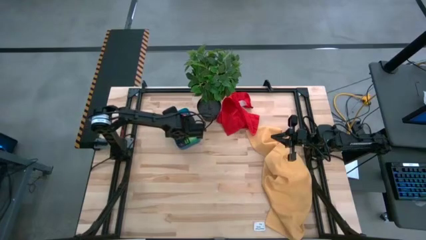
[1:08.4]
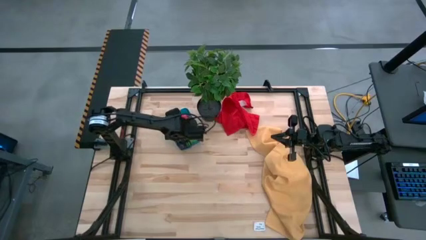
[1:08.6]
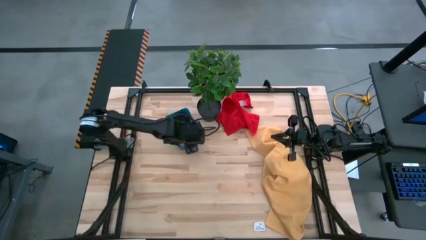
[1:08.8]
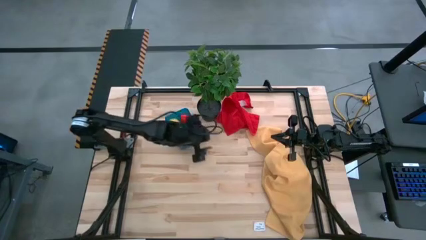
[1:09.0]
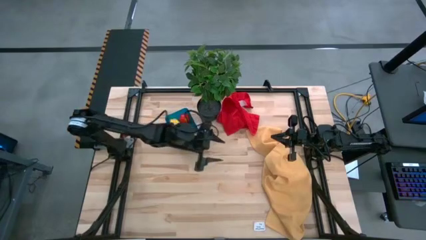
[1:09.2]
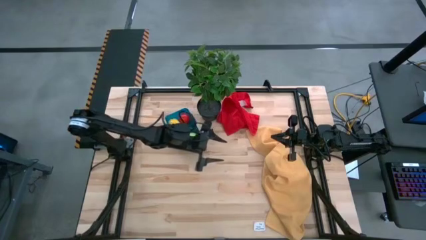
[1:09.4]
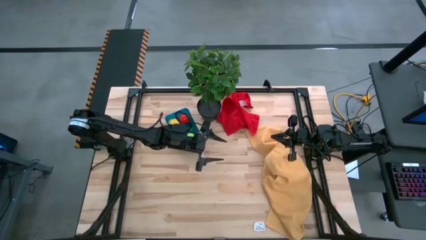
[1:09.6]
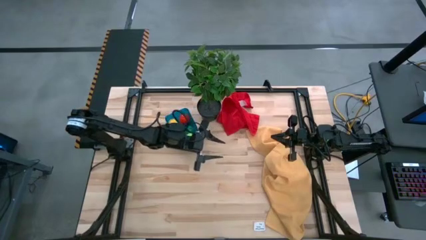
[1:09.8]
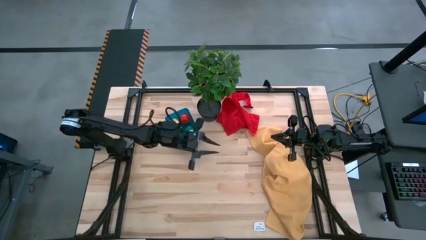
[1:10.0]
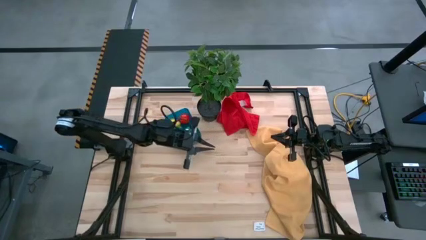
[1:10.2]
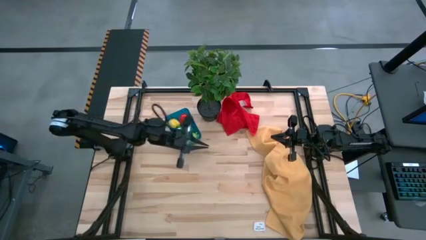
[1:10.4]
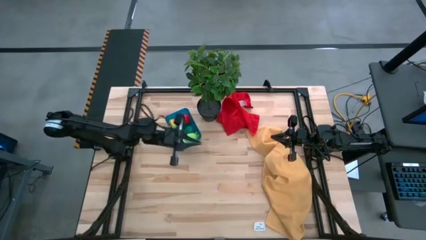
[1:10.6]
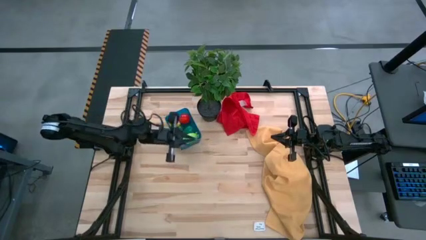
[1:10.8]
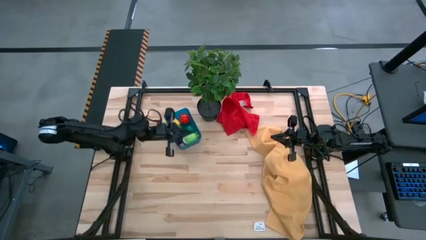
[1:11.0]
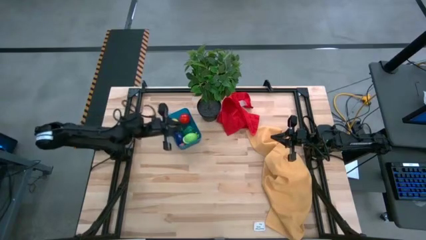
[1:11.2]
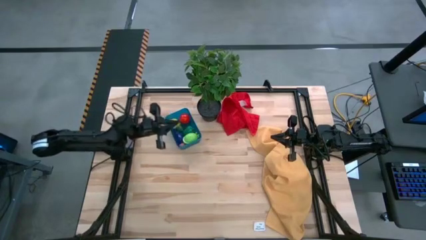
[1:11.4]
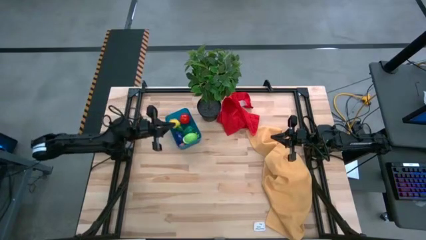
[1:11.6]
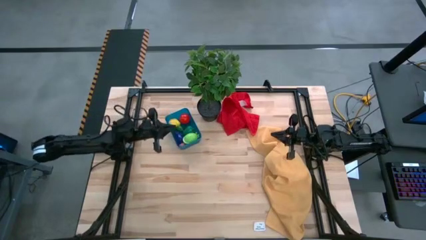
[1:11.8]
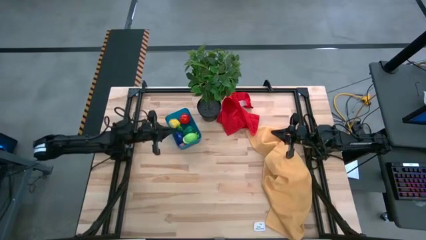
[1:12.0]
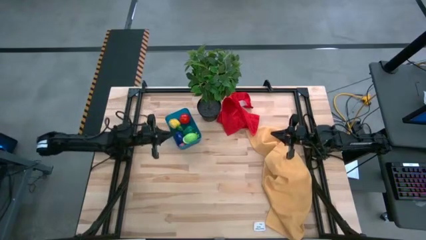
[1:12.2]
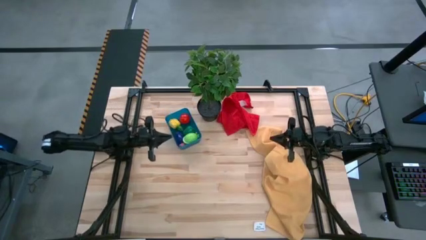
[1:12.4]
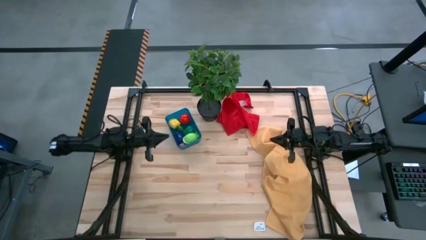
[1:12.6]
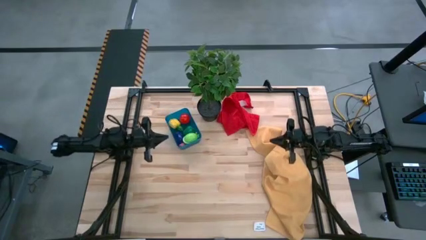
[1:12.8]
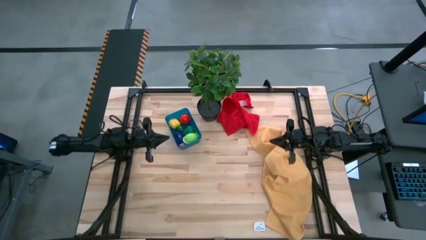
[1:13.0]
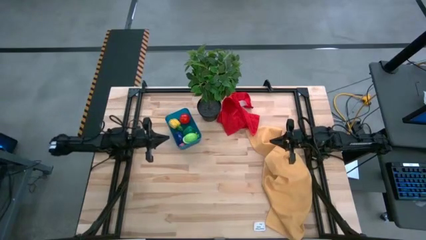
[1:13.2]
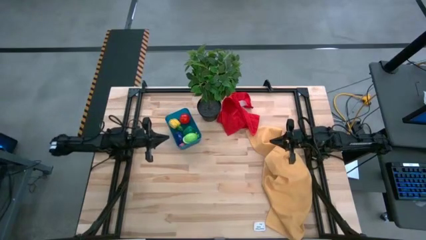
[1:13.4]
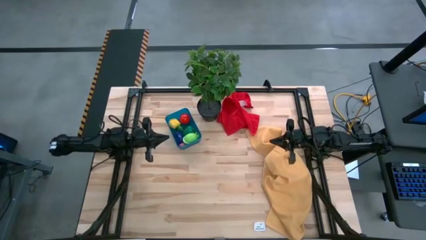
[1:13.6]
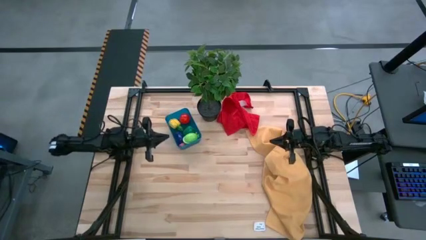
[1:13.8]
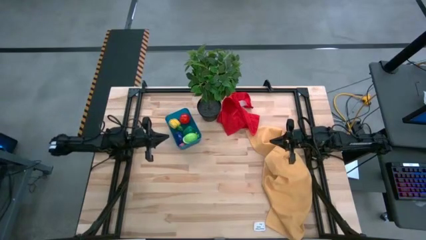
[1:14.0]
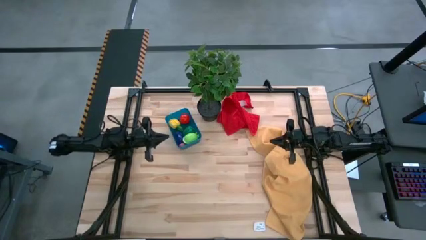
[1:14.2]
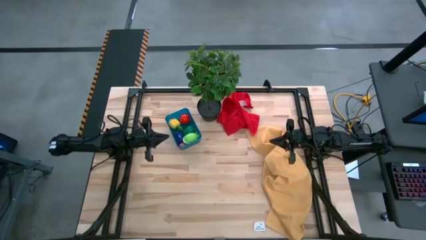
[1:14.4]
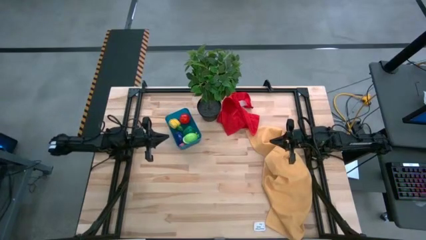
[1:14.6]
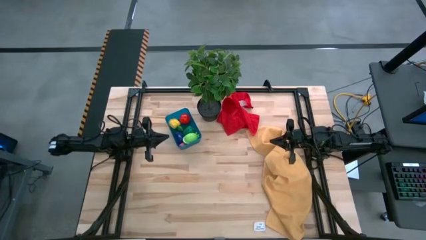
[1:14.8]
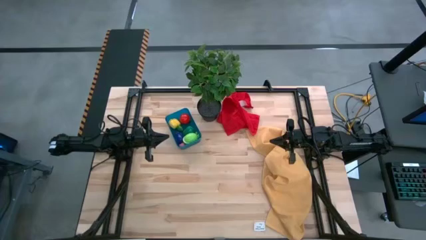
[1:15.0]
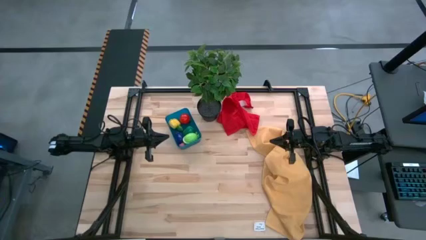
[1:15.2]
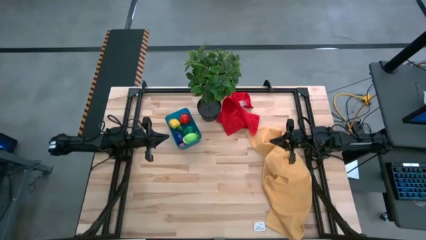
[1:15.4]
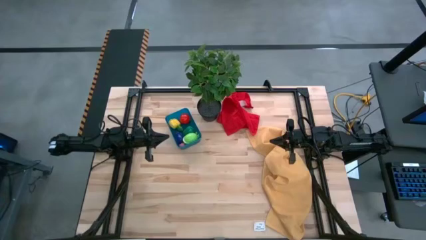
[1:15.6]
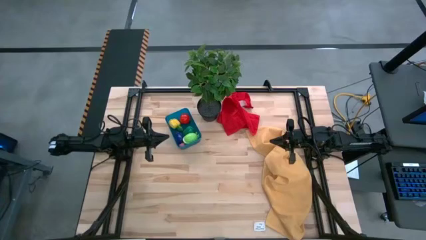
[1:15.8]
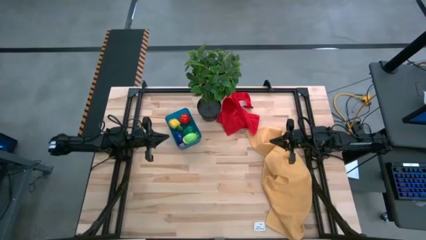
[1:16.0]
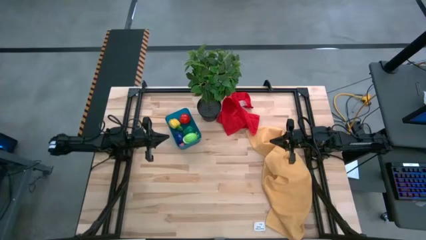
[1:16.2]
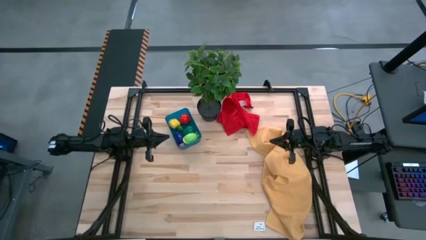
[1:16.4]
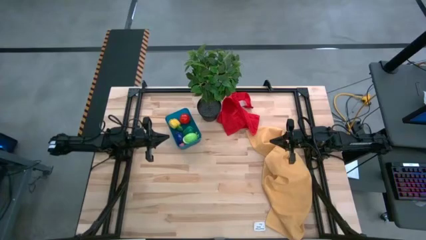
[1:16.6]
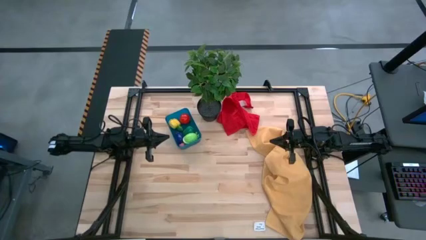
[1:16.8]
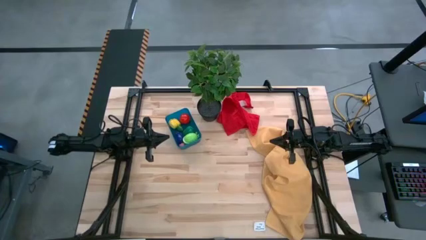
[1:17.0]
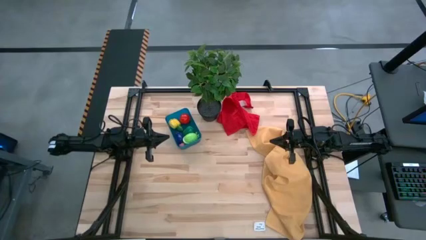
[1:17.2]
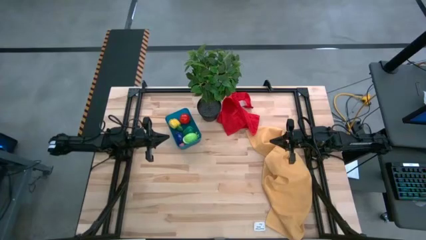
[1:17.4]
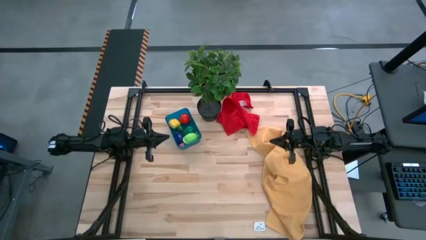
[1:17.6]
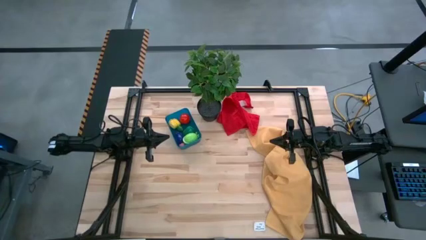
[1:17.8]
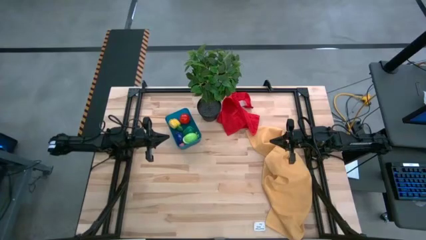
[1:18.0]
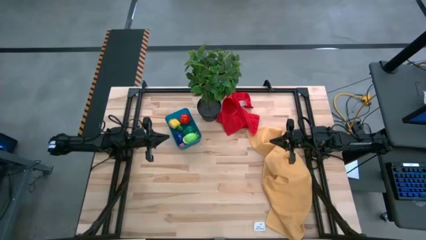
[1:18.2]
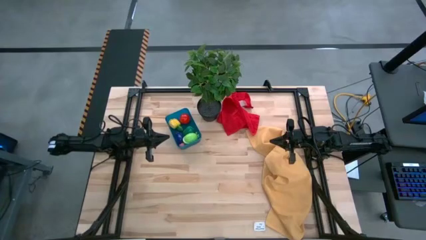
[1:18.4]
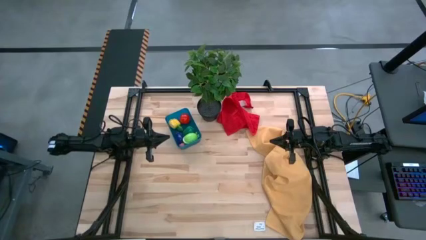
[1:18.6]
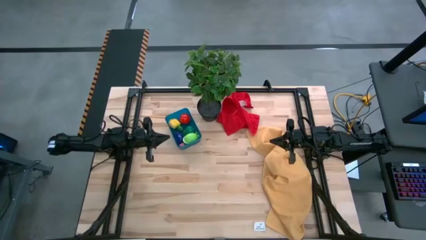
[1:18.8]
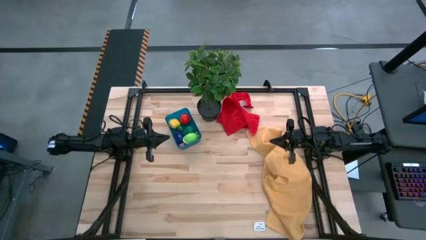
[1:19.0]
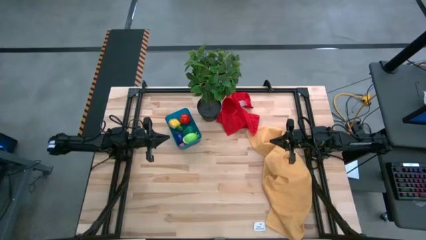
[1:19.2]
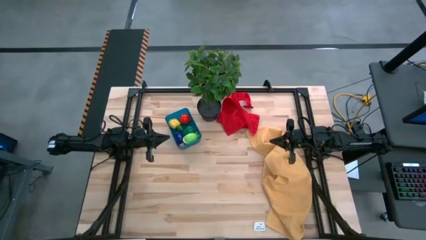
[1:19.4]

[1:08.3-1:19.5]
Task: Pick and placing Produce into tupperware
Return to Home Position

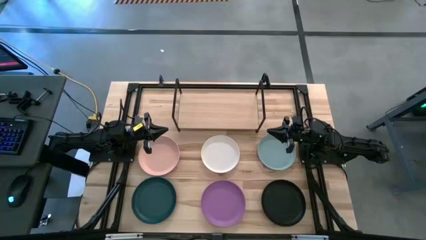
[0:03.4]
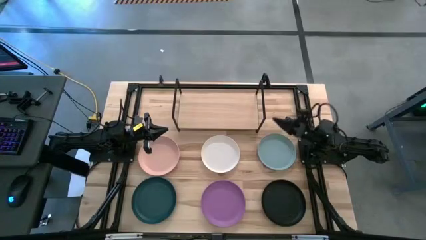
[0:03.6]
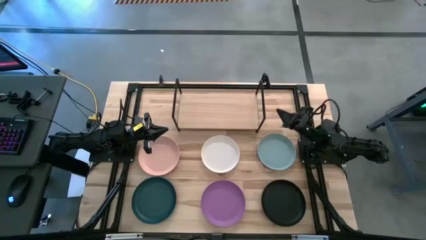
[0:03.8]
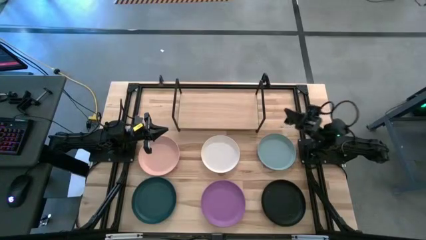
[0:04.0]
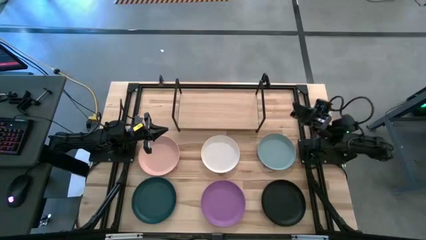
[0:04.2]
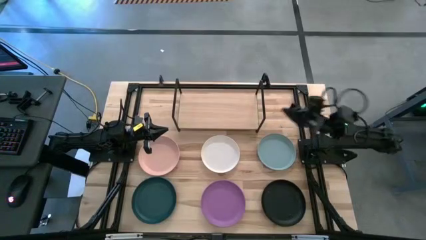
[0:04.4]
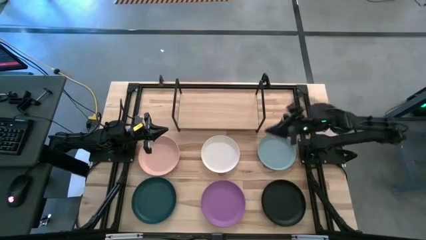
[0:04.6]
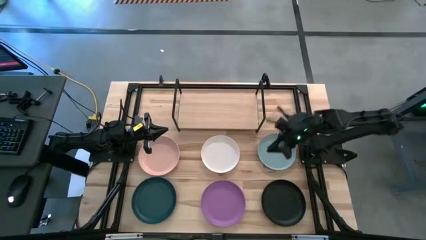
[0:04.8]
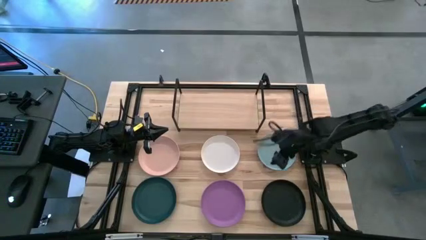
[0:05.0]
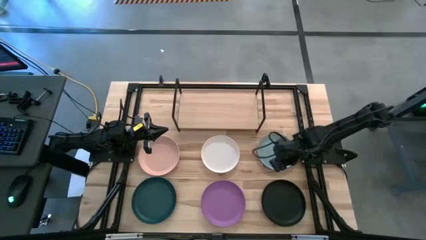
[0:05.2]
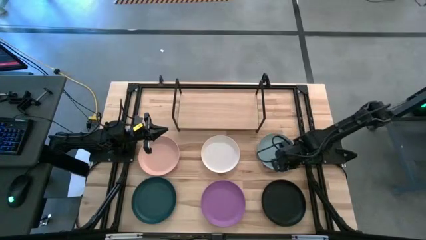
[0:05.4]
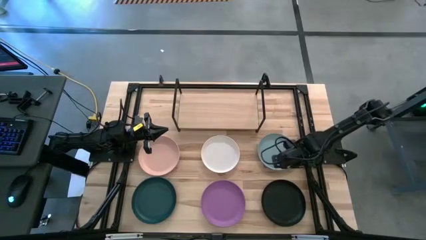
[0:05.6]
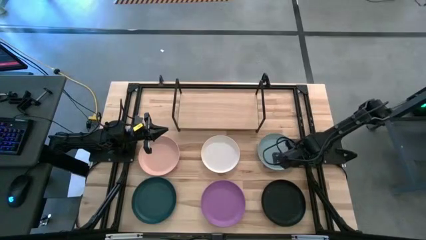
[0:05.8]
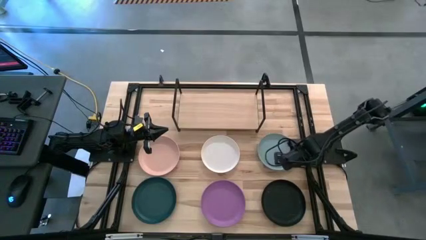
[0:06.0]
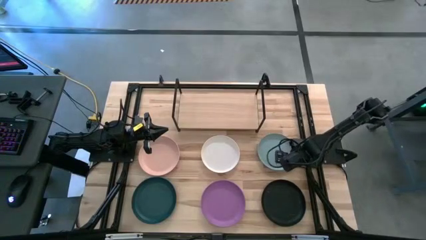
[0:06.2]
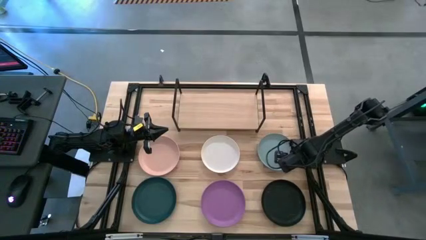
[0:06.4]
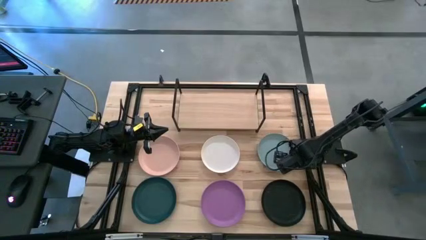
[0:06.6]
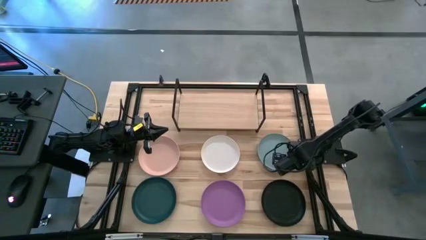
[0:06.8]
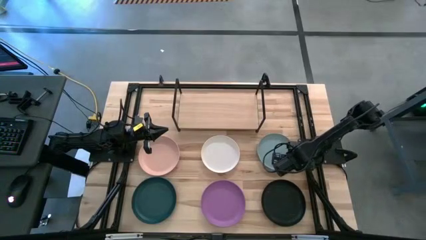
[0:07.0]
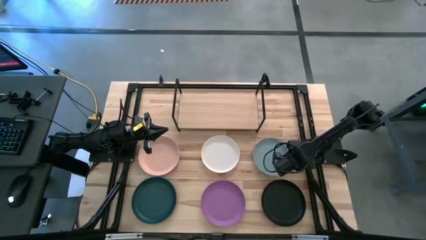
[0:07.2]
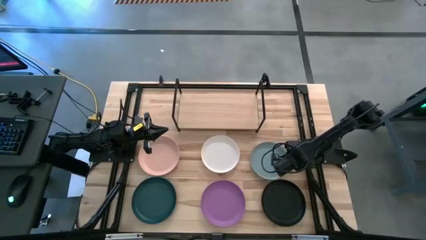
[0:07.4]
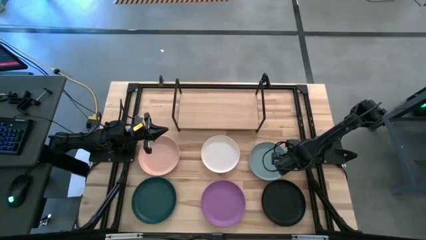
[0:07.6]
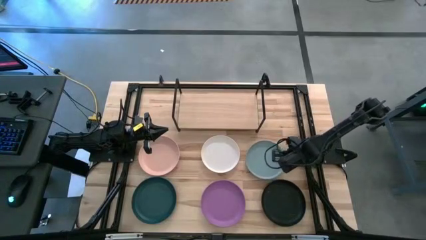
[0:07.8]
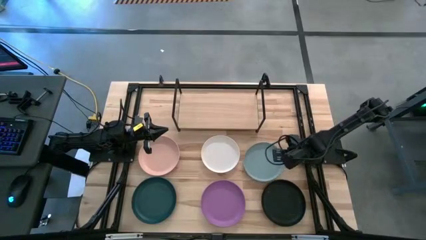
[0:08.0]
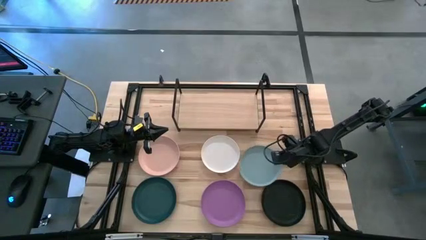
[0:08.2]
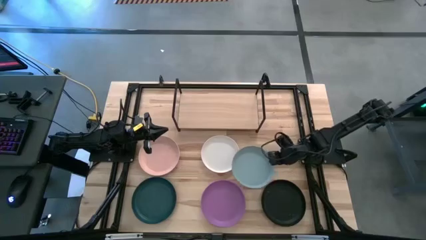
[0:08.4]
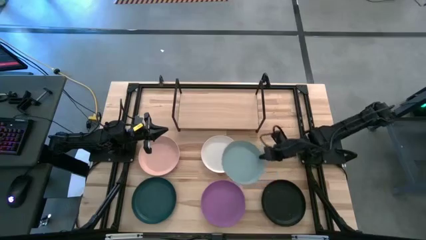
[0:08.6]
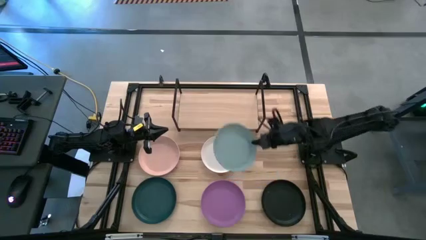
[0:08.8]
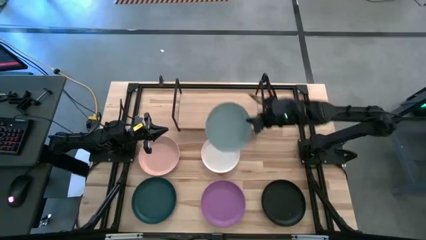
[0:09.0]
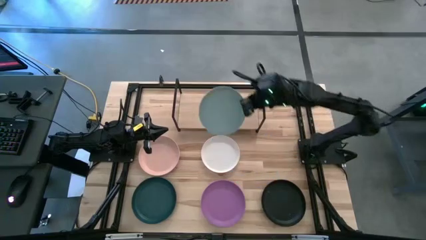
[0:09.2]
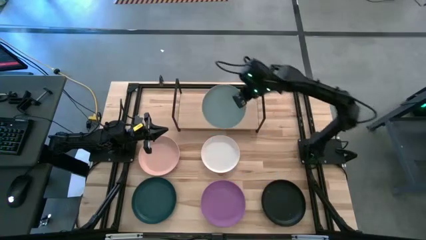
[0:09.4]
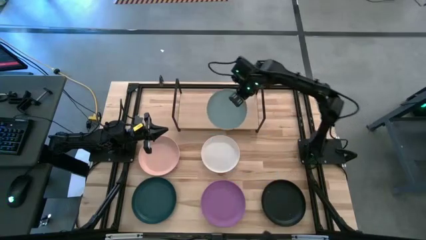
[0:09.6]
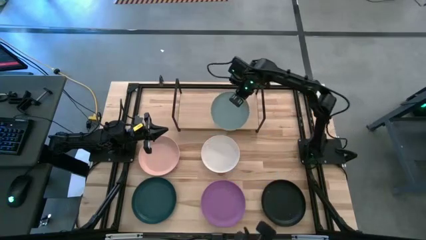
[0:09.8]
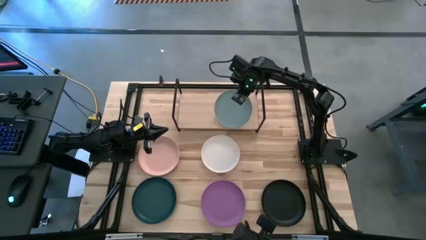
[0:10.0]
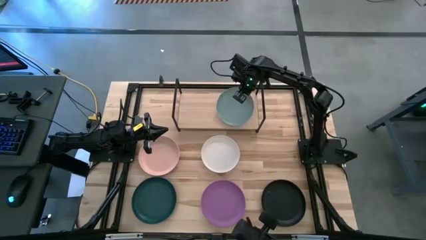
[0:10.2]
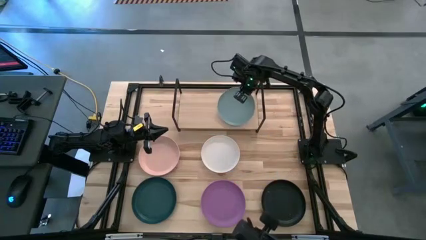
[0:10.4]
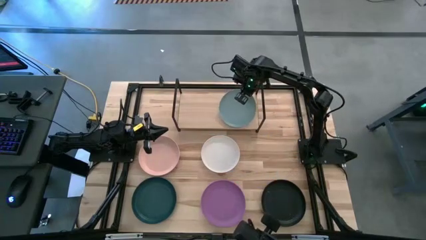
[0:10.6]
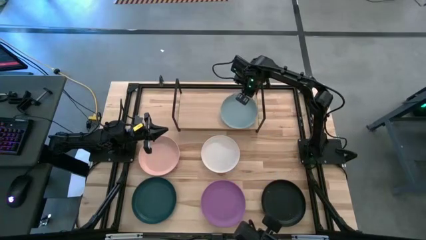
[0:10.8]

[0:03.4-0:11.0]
Task: Place and stack plates onto a shelf
Put the grey plate on the shelf
